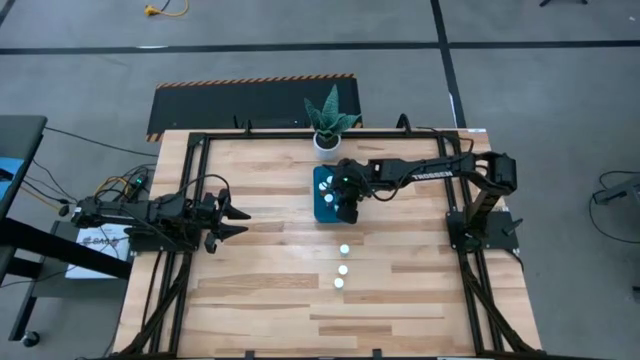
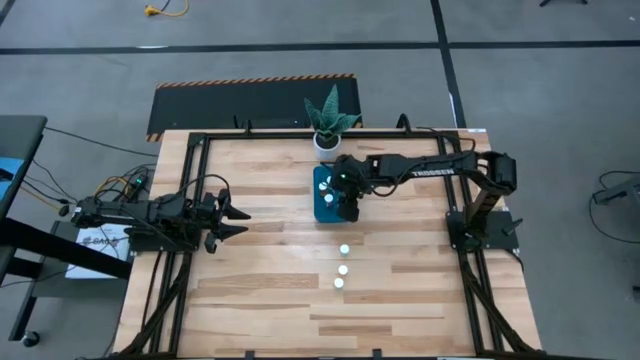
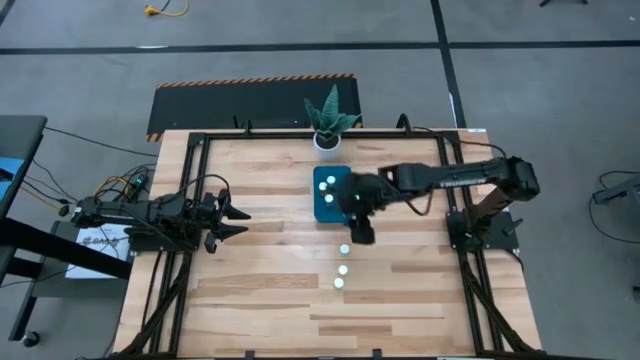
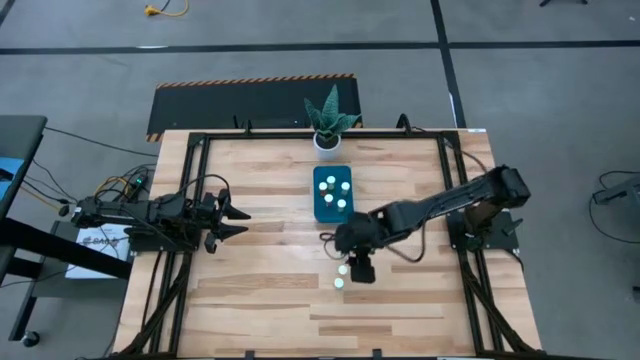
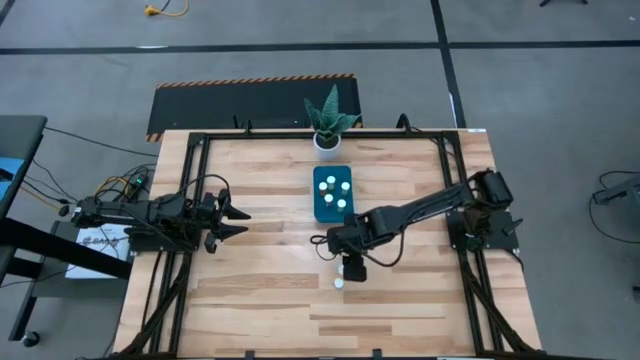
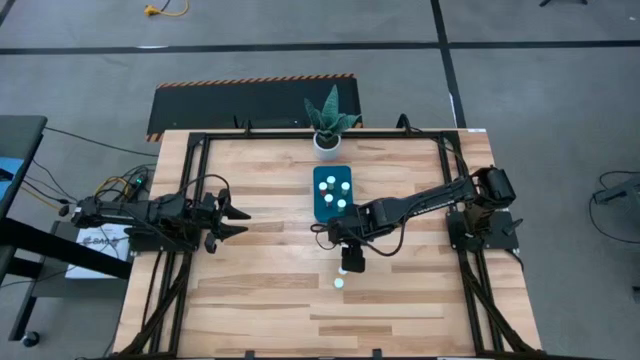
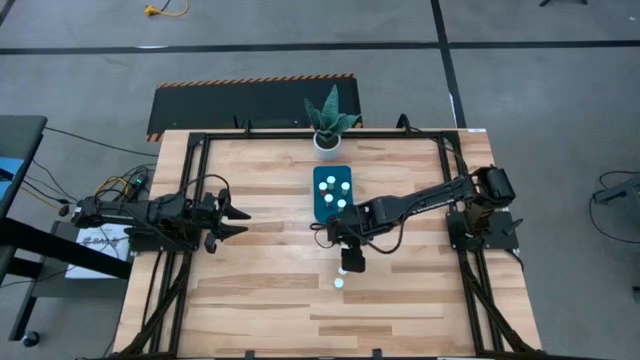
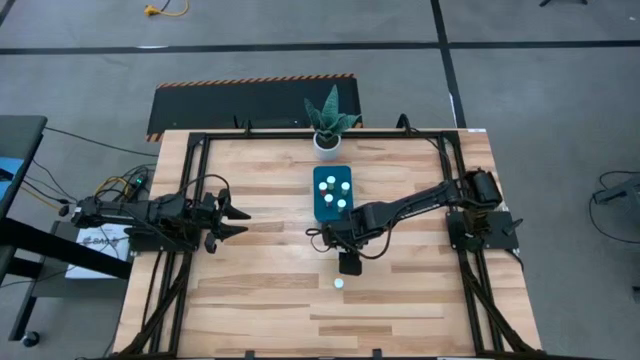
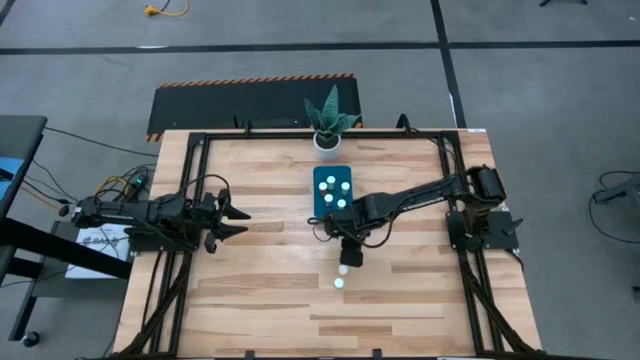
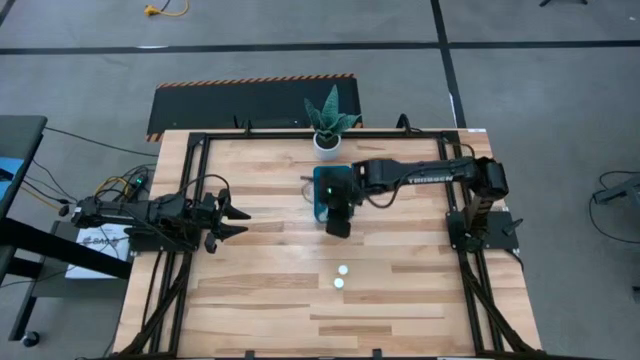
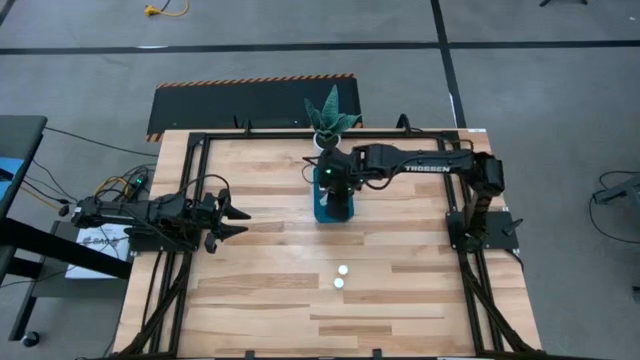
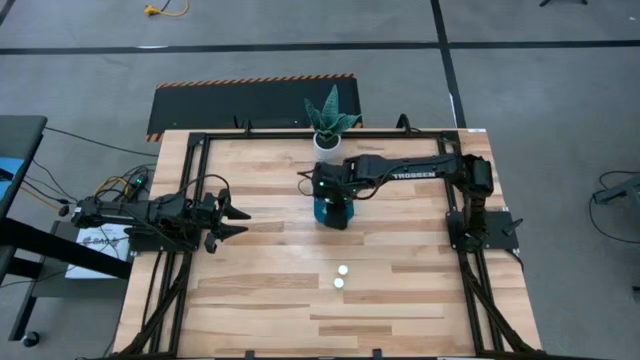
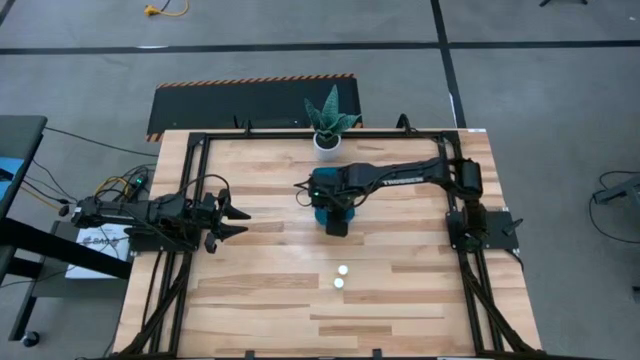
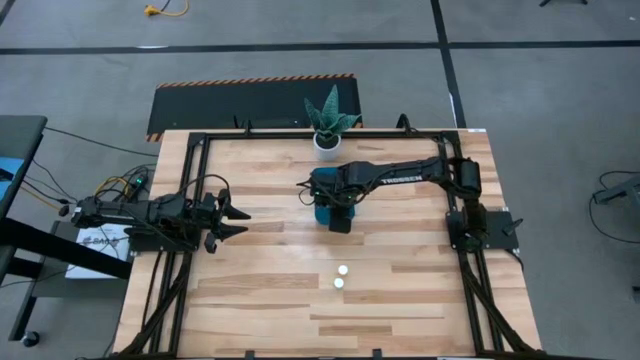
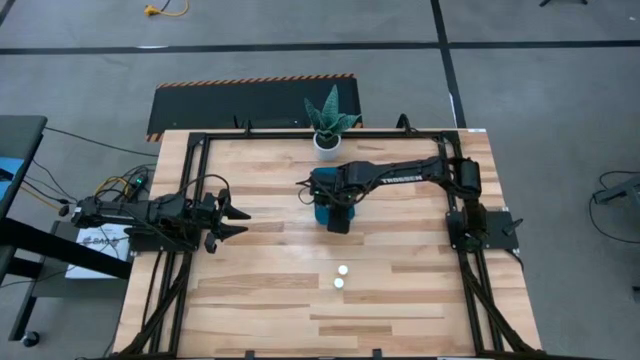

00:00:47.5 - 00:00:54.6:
Task: Pick and place pill bottles into a basket
Put the blue pill bottle into the blue bin

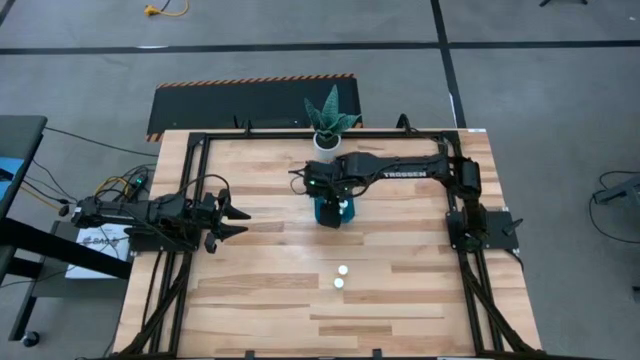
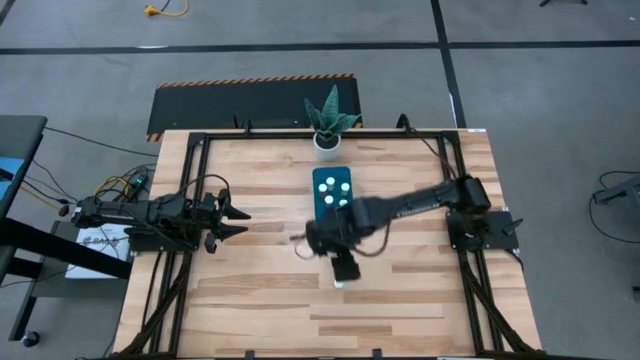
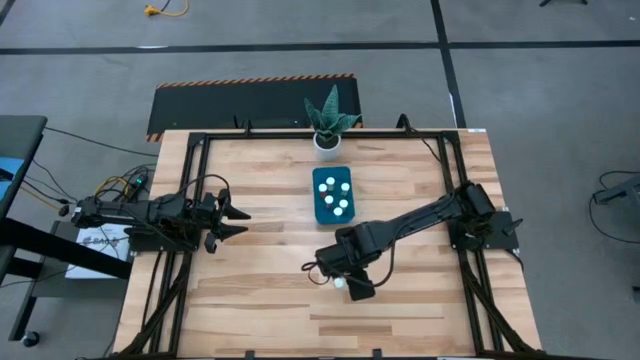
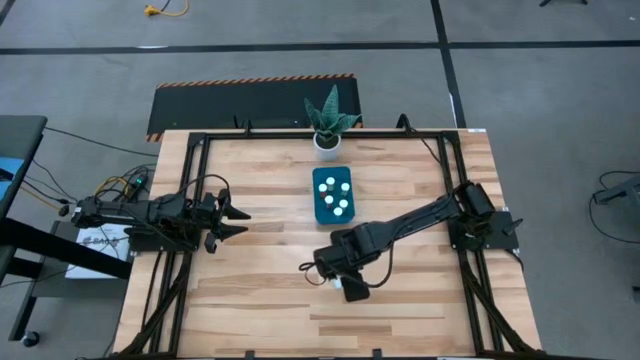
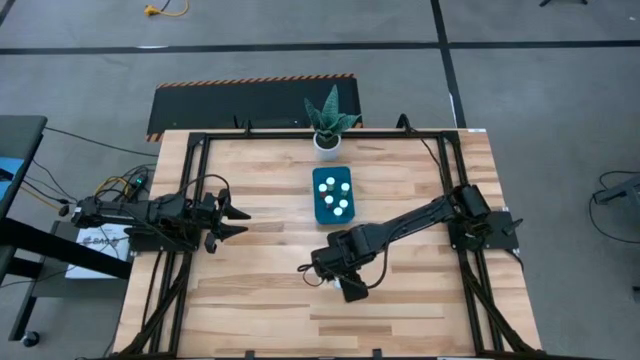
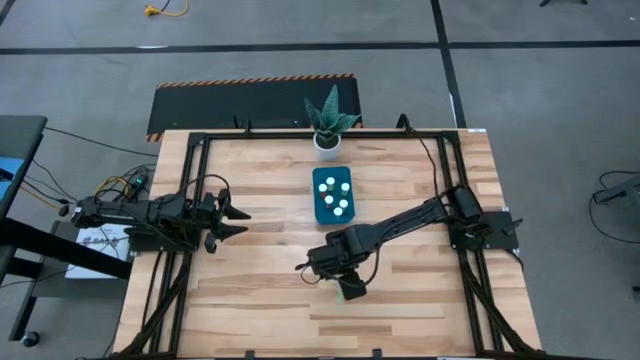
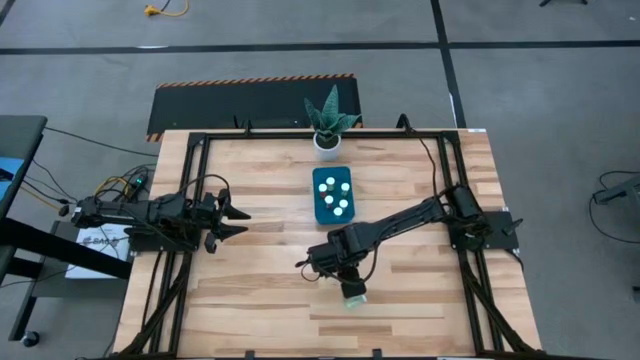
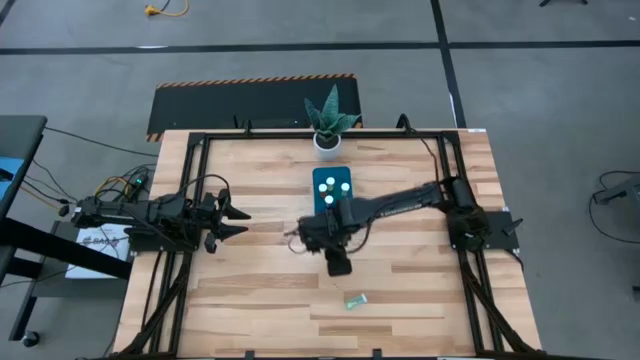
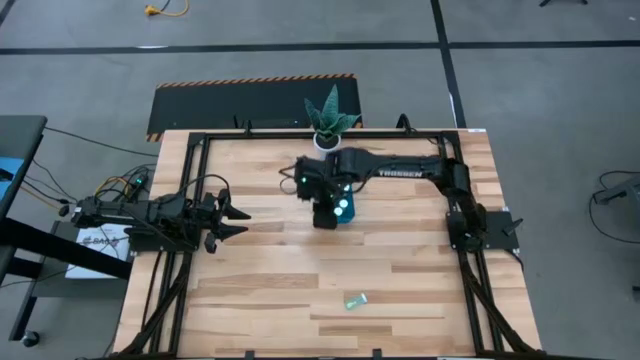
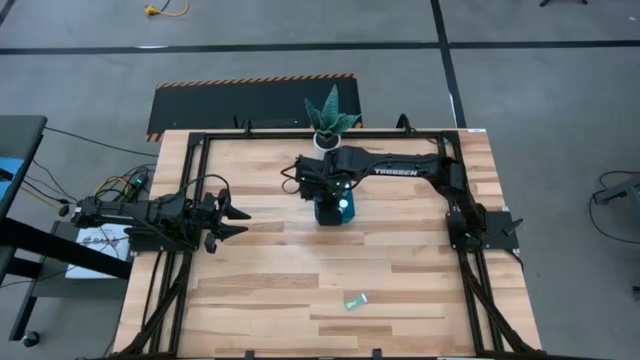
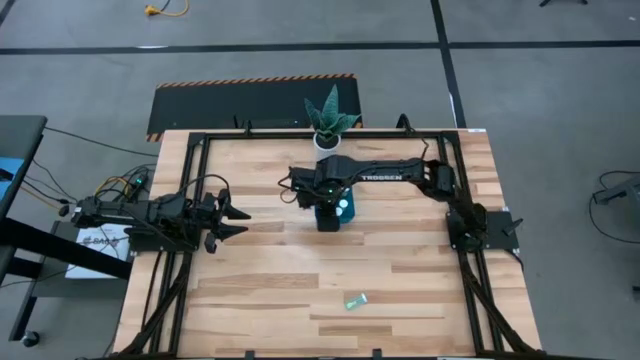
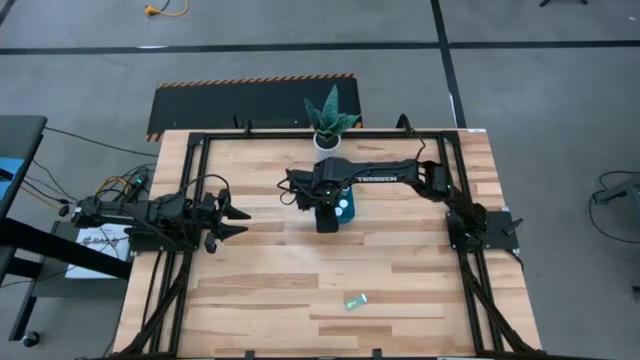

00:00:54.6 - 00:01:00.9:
Put the yellow pill bottle into the blue bin

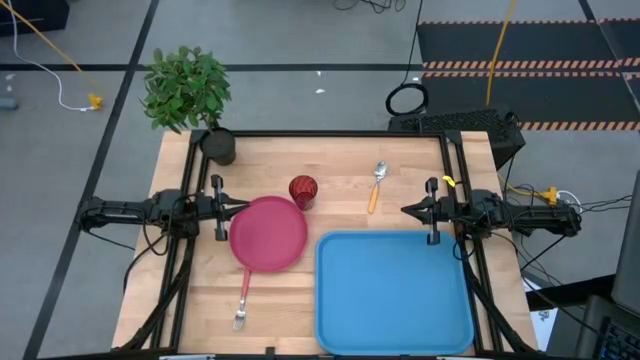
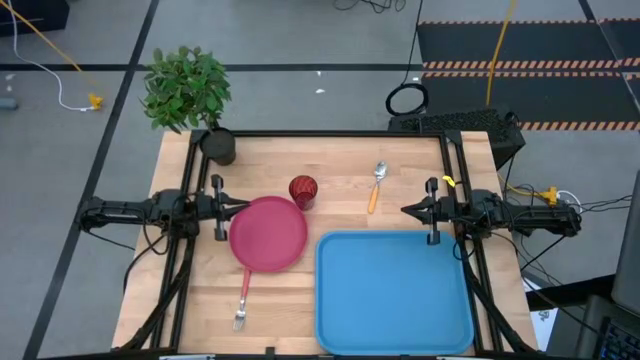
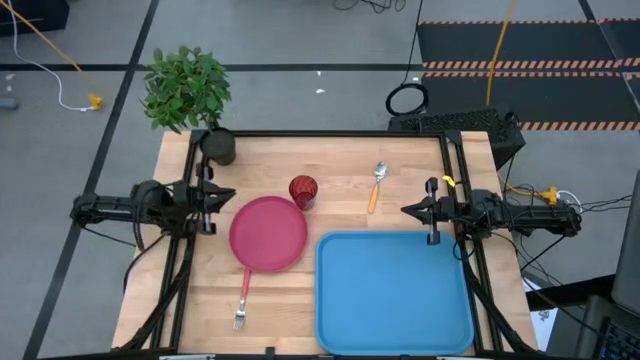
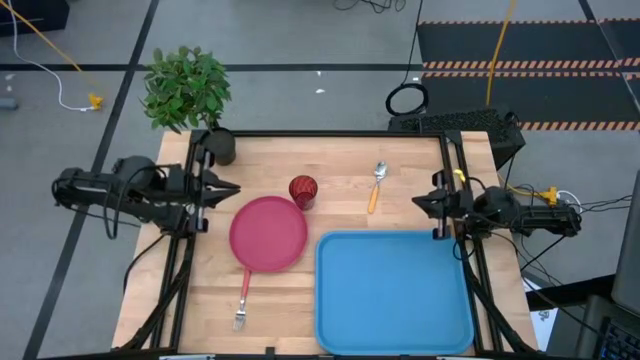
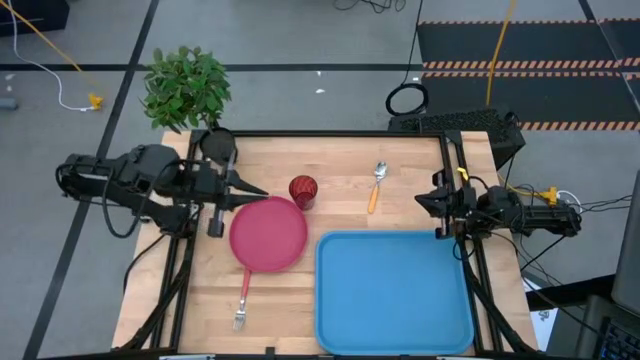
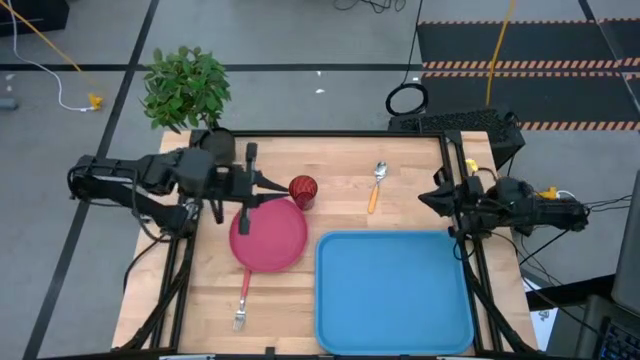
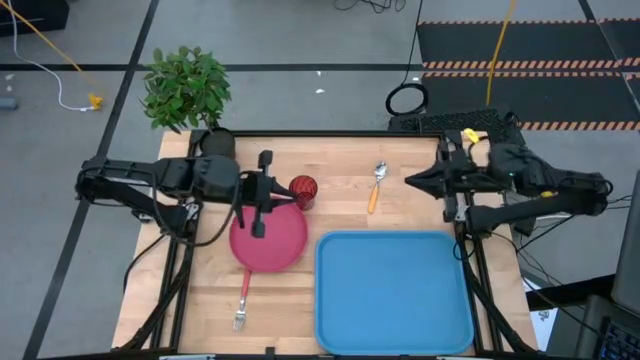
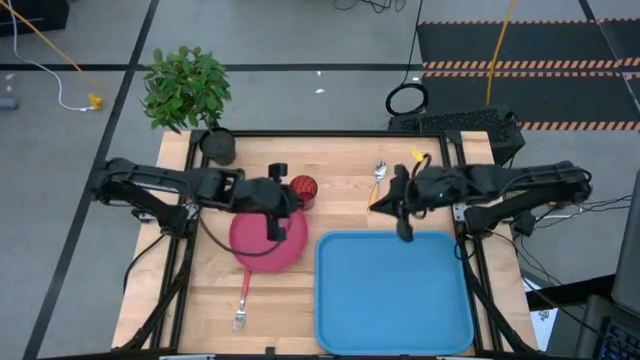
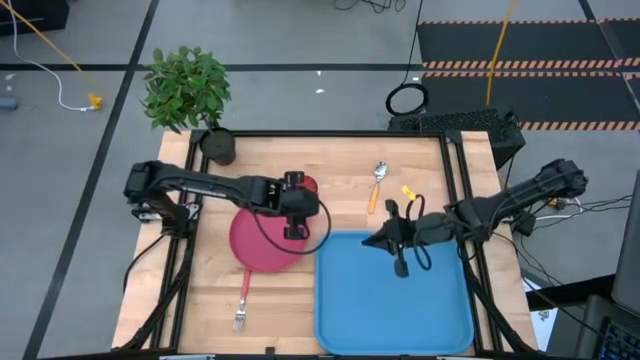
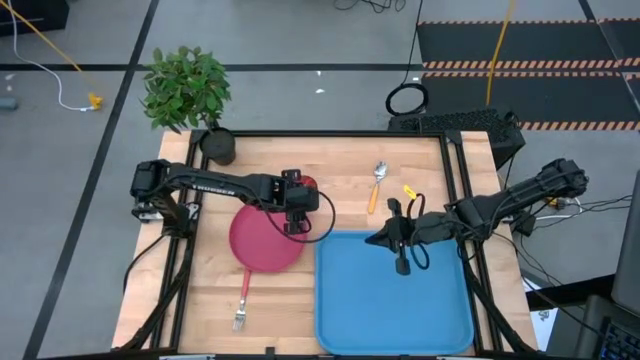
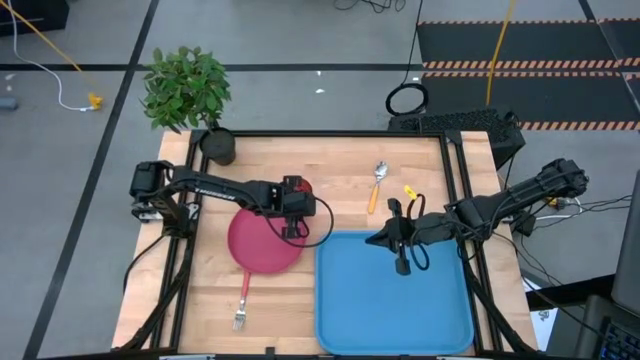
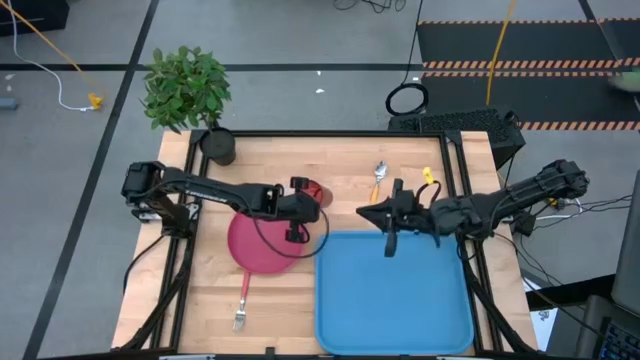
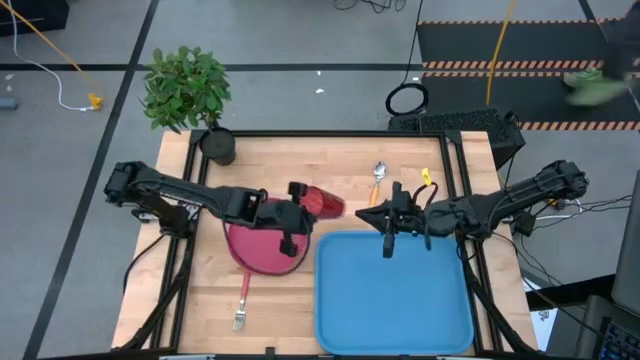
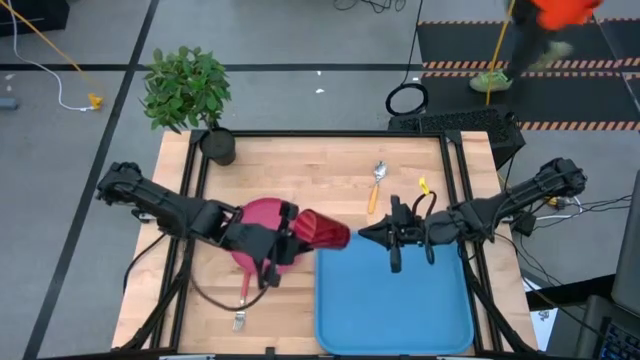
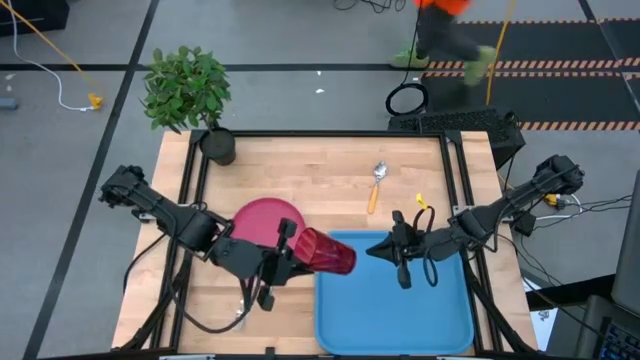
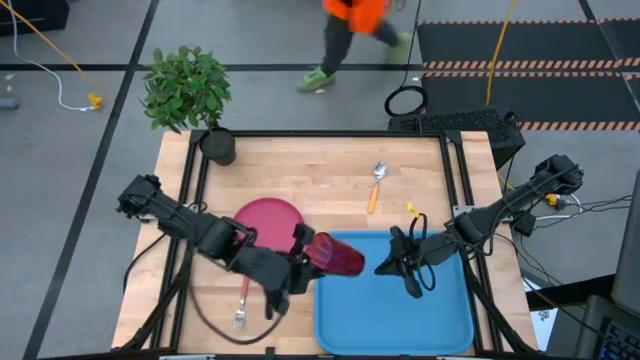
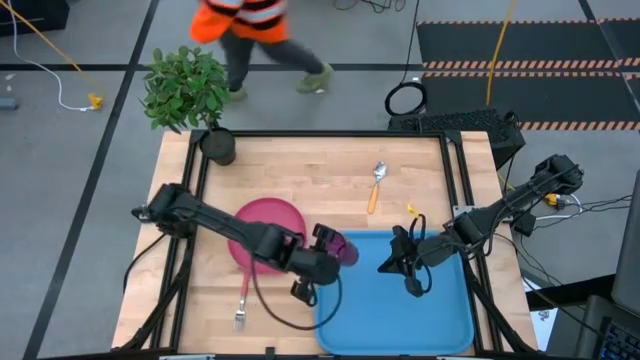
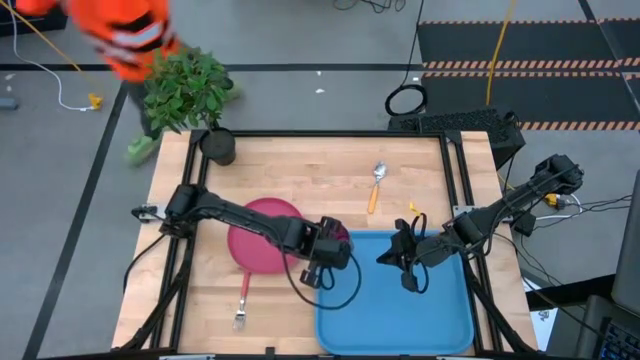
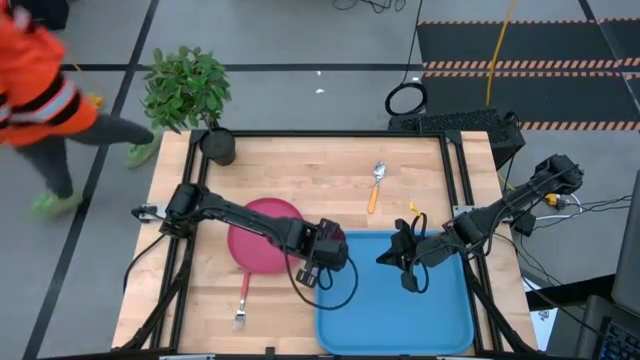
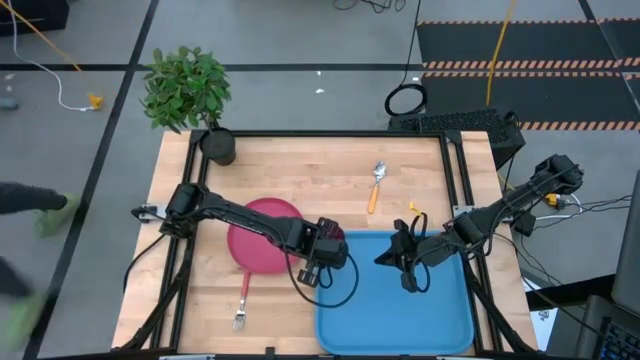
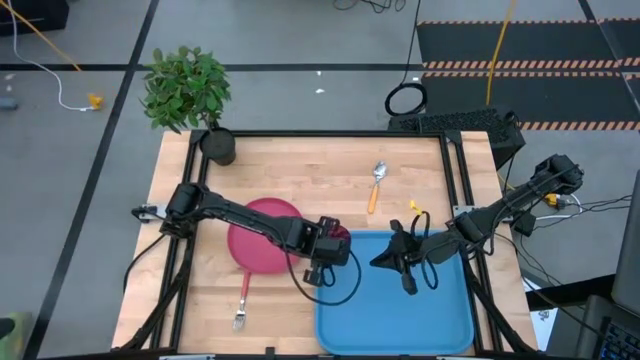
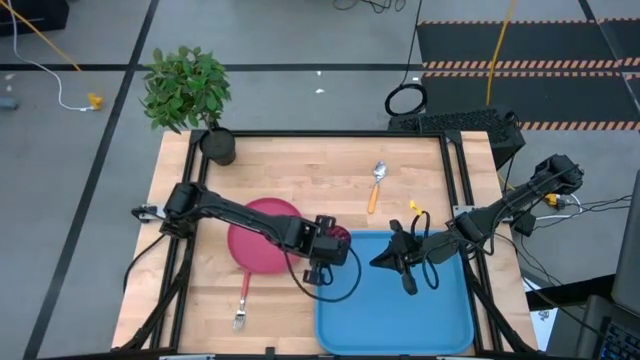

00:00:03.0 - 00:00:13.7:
Task: Pick and place plate/cup/fork/spoon on tray
Put the red cup on the top left of the blue tray
